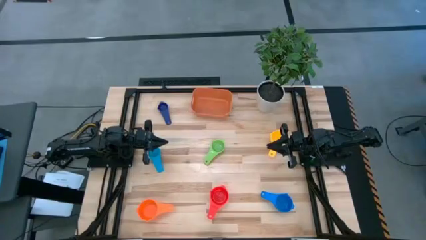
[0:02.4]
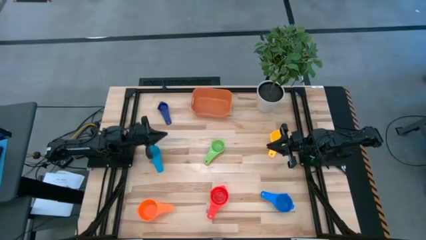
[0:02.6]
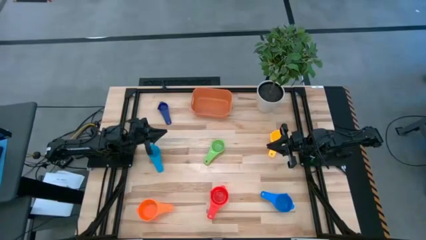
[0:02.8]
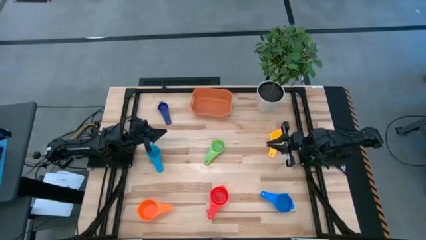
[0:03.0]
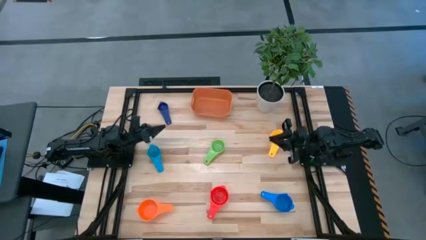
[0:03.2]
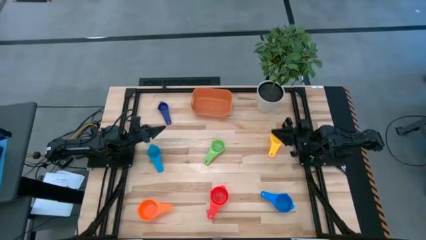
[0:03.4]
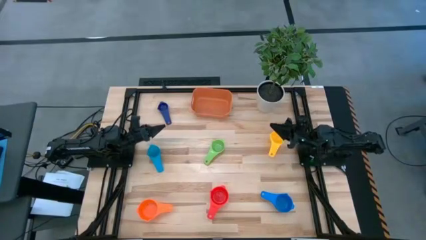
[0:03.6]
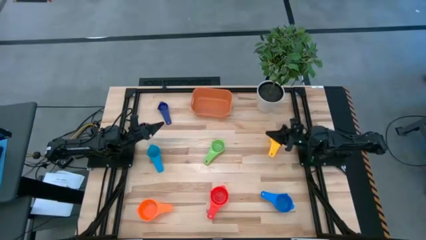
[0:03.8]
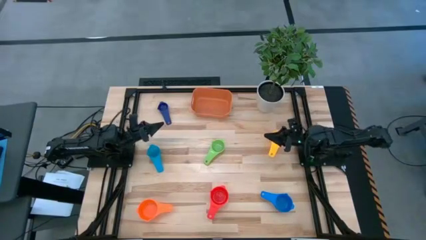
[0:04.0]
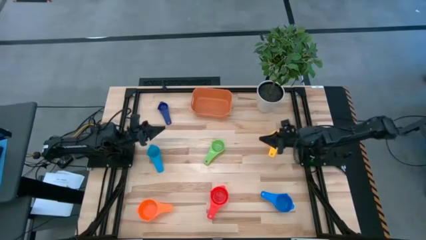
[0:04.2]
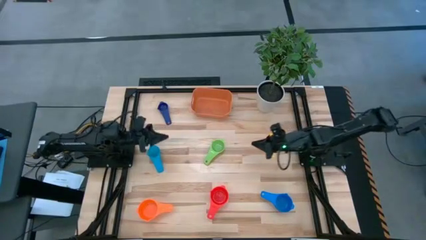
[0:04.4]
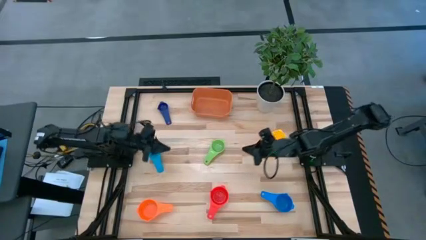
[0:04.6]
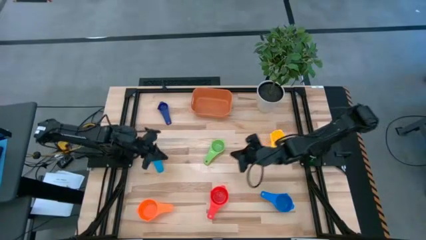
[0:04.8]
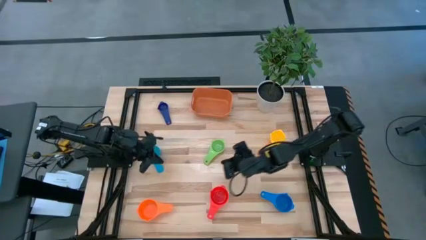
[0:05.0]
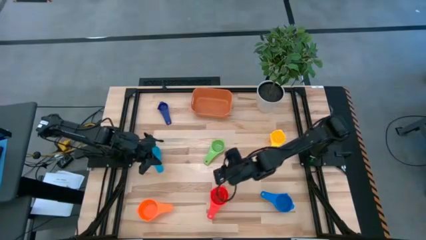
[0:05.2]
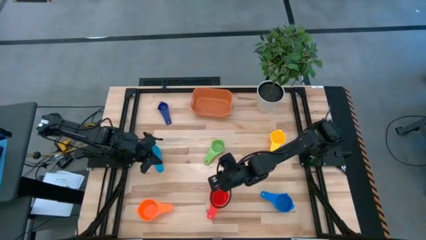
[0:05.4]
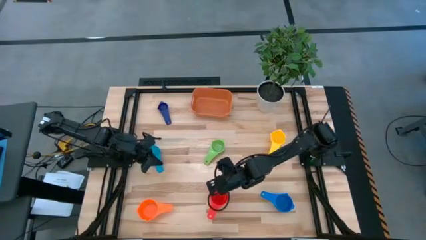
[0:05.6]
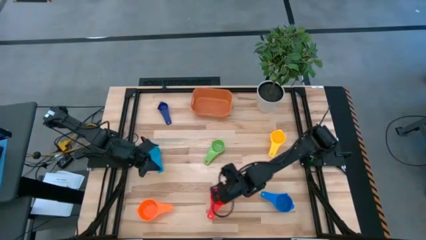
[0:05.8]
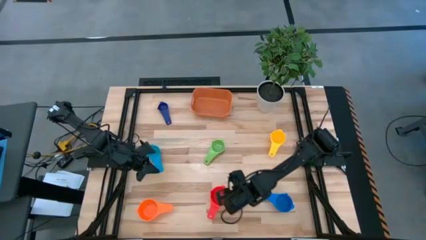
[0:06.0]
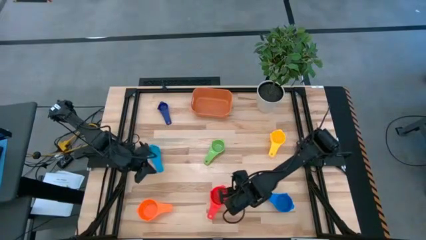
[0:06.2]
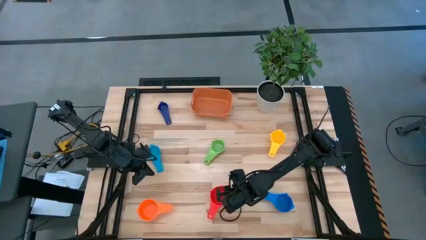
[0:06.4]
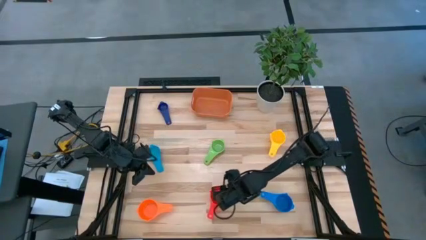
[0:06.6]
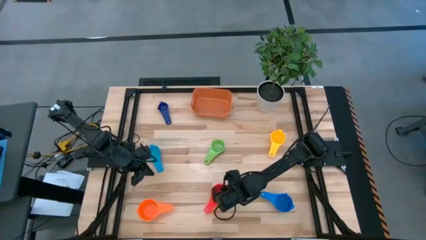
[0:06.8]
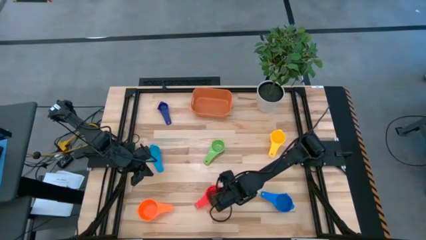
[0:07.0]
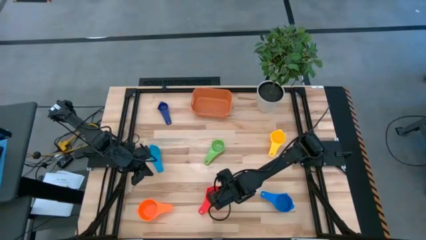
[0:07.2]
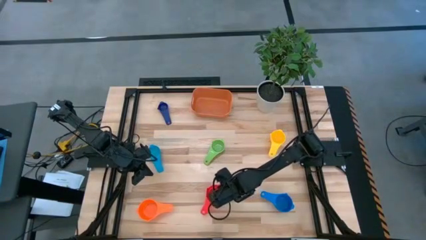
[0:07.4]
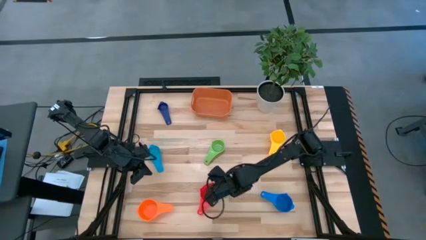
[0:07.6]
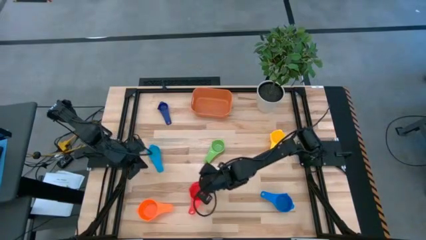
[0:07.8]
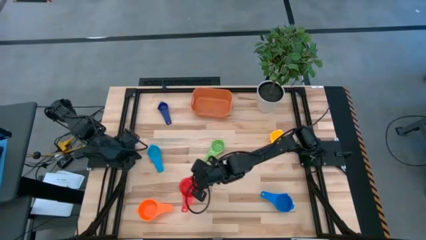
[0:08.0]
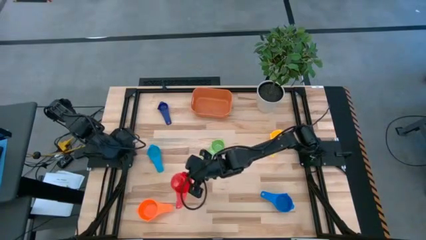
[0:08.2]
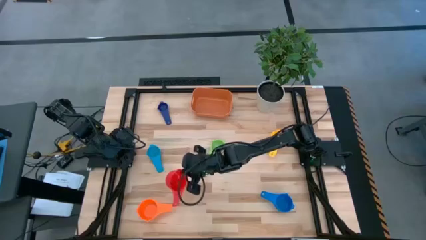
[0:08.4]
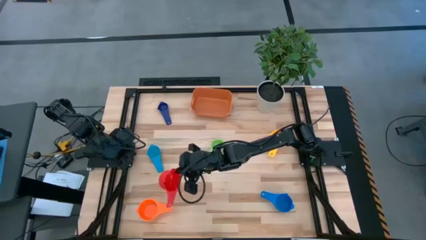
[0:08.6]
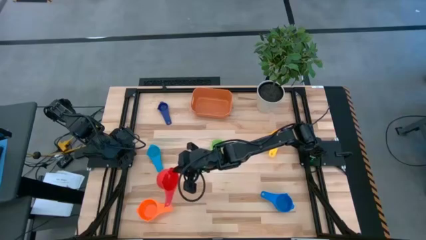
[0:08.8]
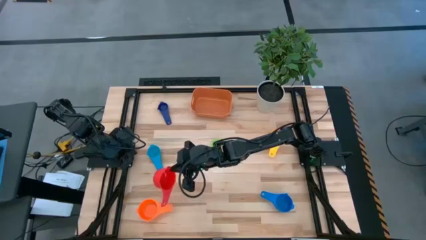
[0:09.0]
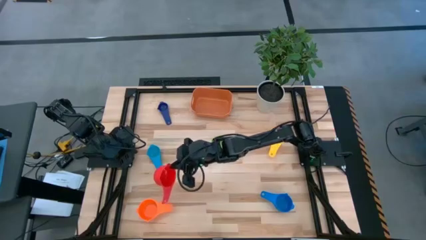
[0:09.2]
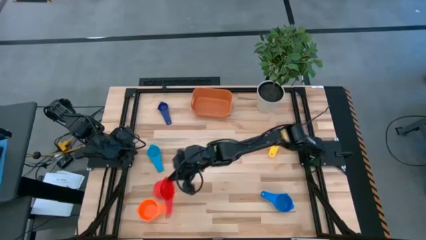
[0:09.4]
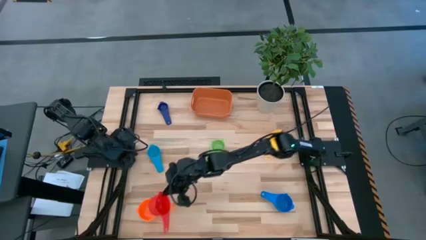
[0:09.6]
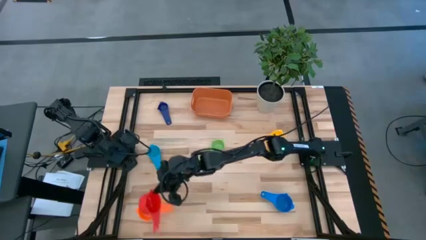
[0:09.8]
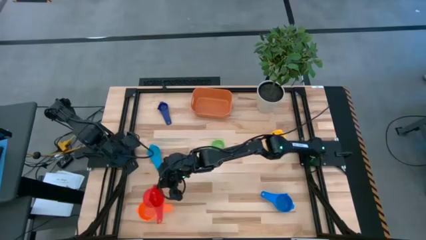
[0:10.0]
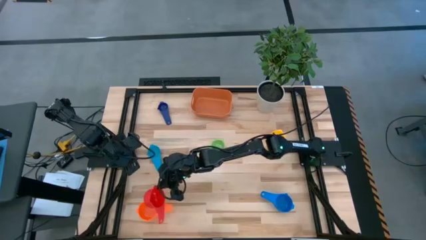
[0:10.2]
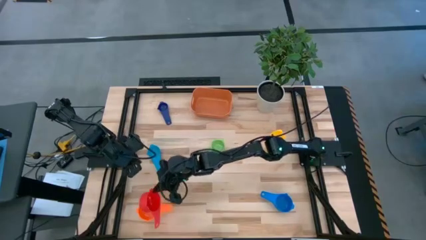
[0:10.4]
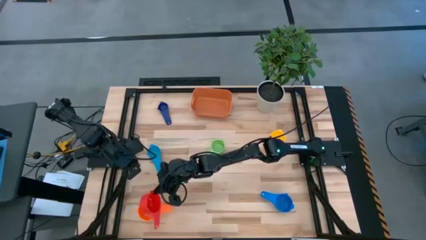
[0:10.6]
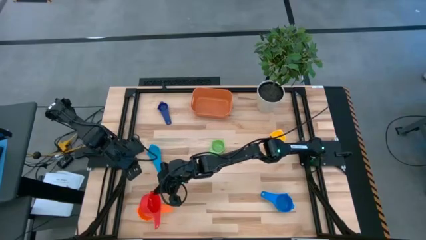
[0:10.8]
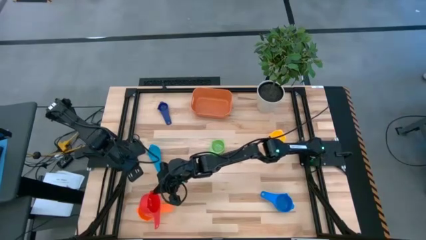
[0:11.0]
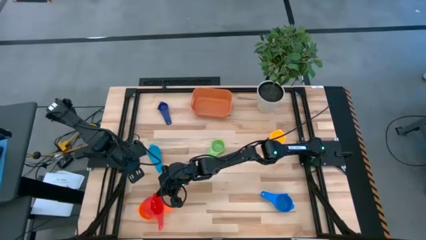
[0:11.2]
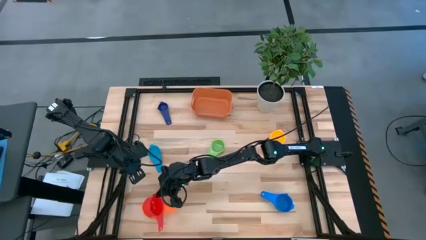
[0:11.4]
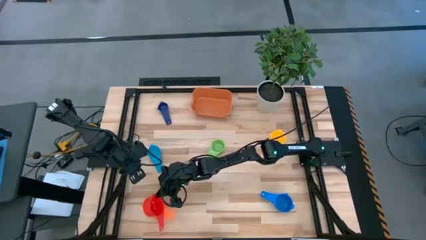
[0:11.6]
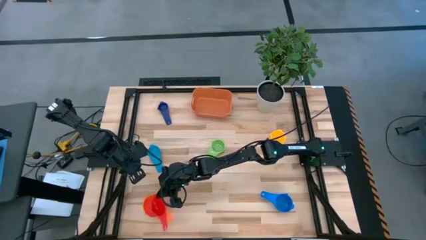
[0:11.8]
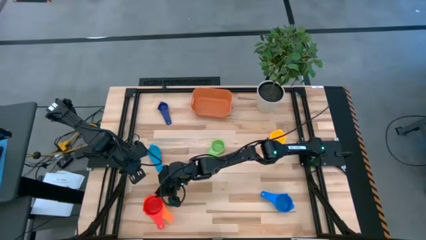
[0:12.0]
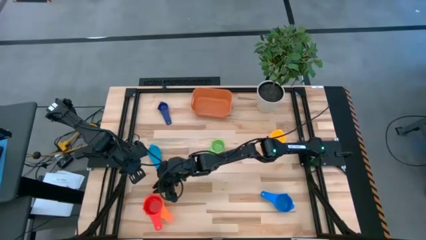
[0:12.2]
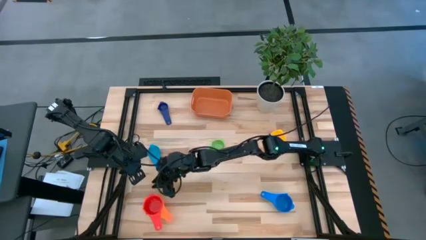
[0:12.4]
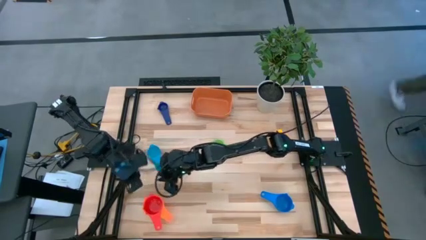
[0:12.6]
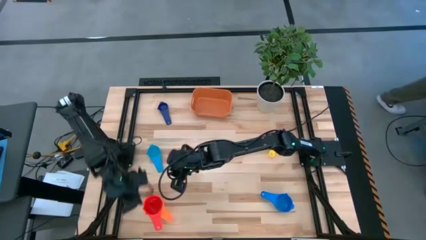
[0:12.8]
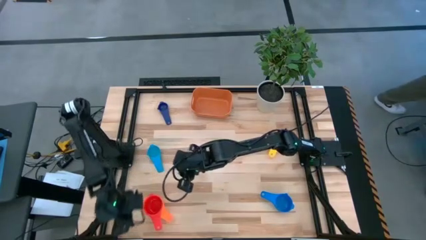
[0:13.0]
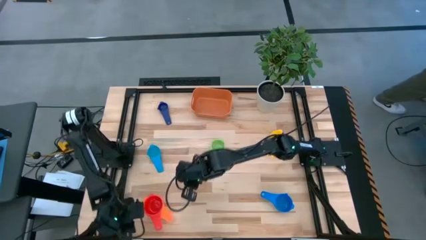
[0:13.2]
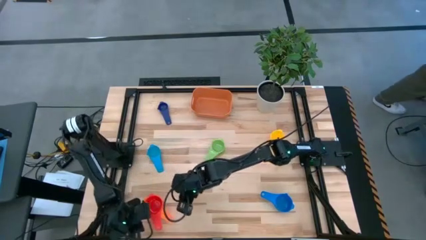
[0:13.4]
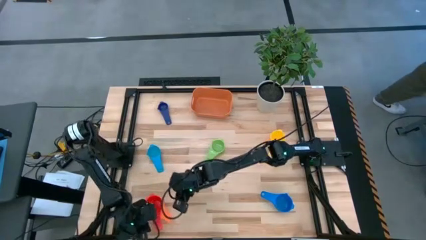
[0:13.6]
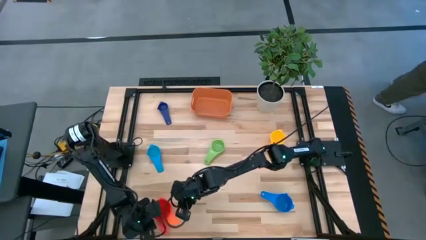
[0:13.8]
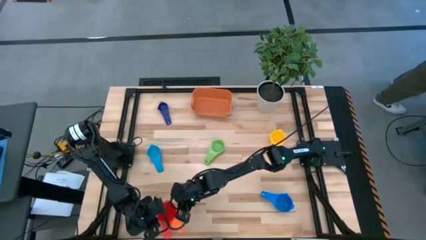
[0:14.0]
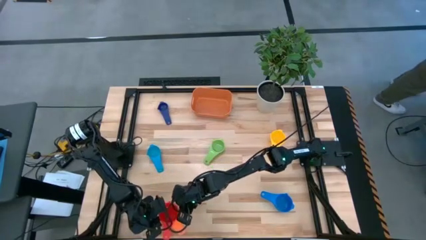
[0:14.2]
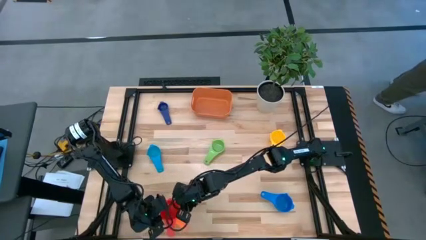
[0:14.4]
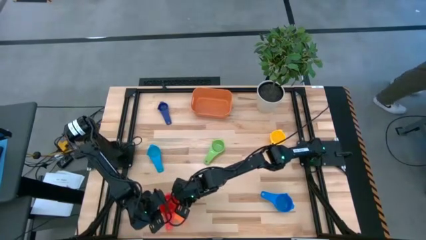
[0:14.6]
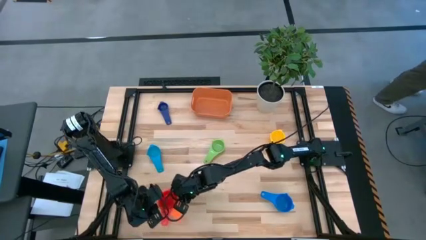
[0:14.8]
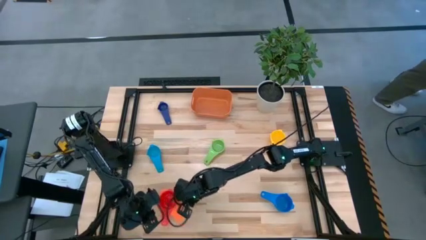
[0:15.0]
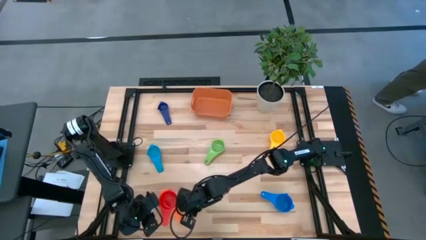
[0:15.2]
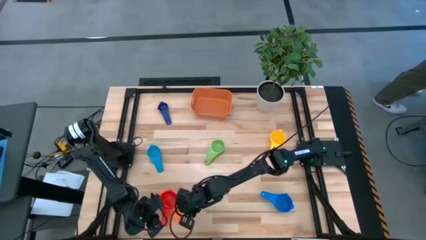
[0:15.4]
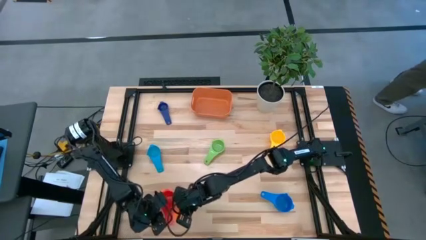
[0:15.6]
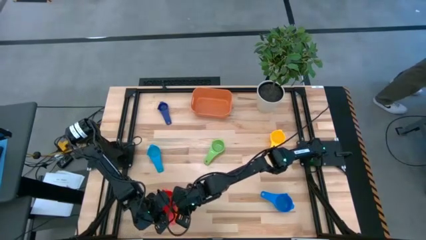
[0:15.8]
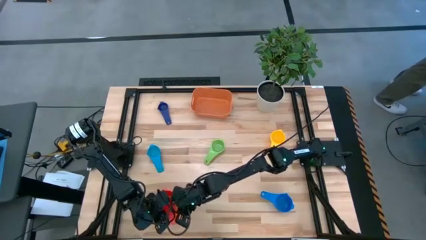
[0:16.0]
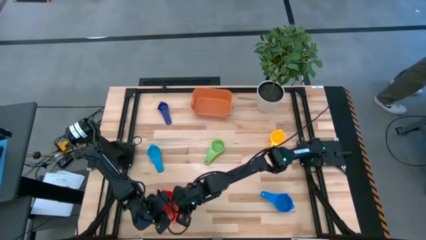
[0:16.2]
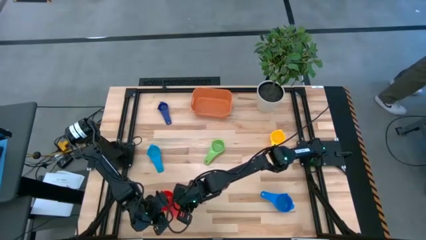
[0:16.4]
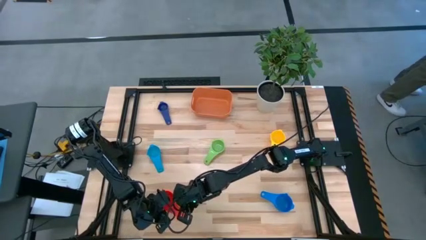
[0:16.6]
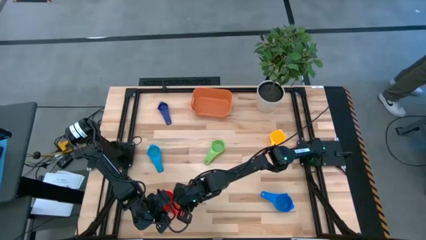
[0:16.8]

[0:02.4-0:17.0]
Task: Nest measuring cups in basket
Stack the red measuring cup on top of the orange measuring cup

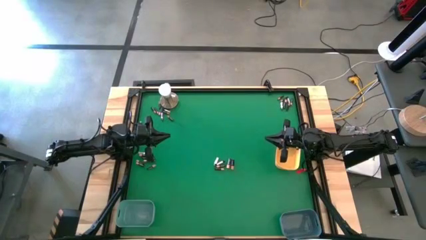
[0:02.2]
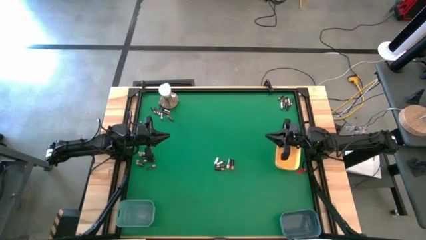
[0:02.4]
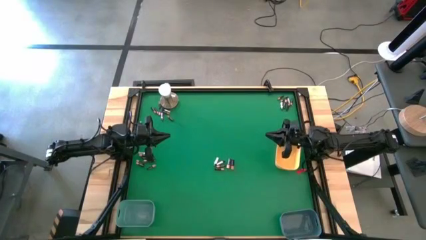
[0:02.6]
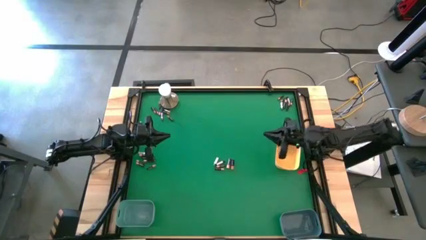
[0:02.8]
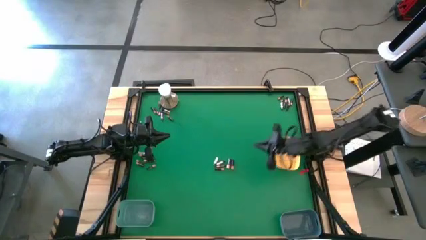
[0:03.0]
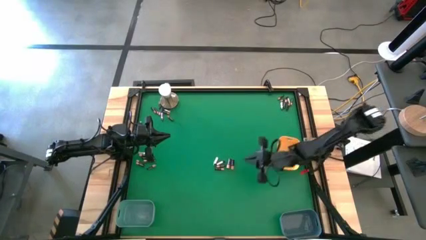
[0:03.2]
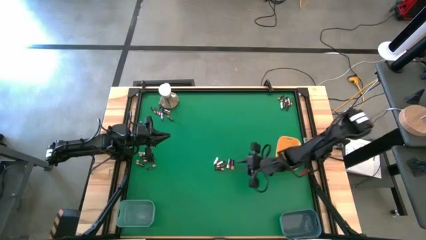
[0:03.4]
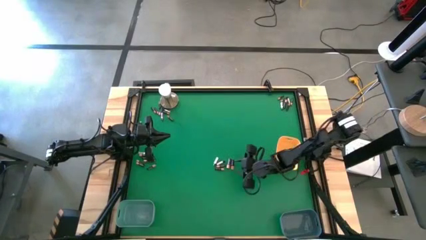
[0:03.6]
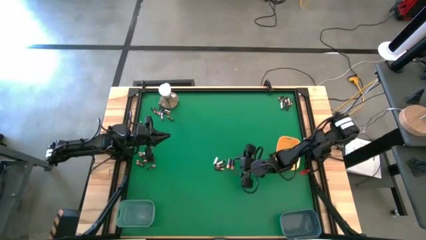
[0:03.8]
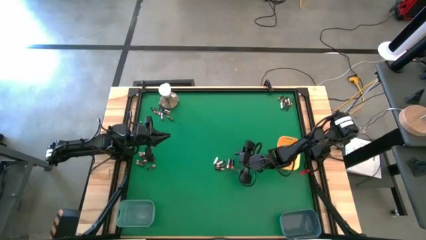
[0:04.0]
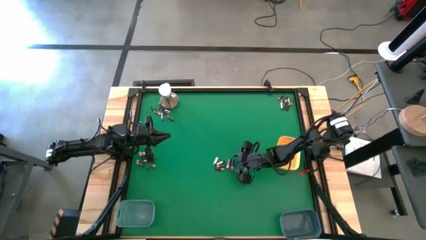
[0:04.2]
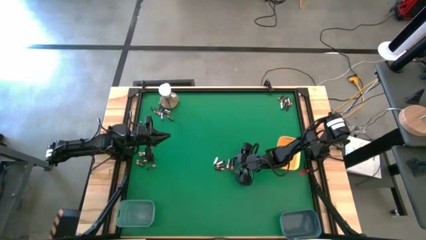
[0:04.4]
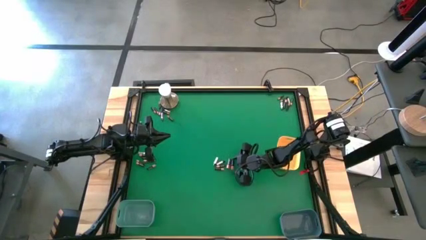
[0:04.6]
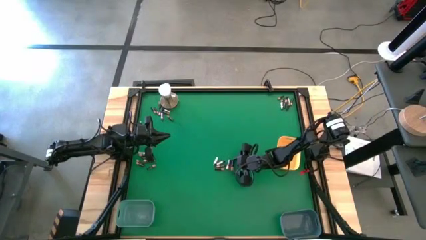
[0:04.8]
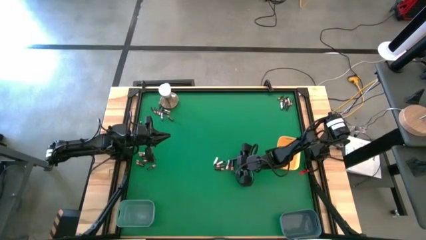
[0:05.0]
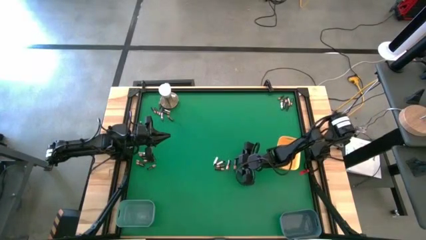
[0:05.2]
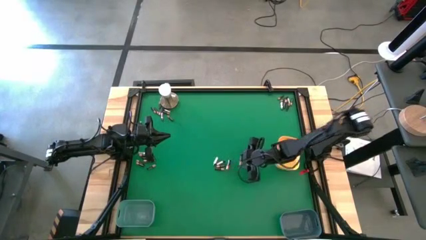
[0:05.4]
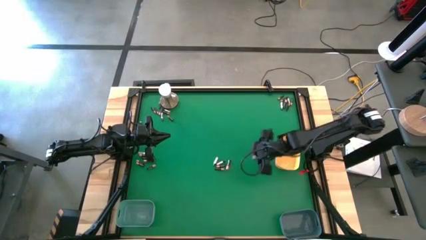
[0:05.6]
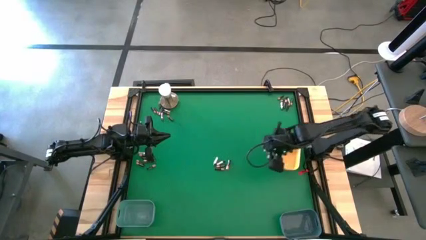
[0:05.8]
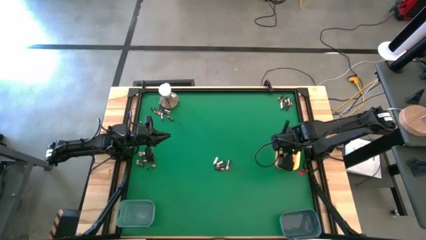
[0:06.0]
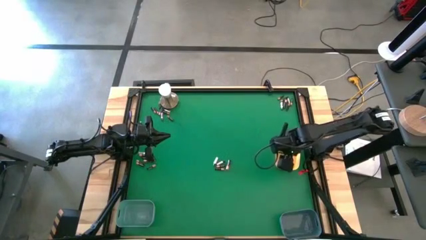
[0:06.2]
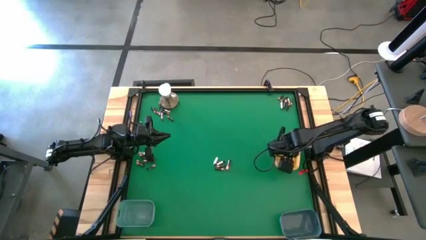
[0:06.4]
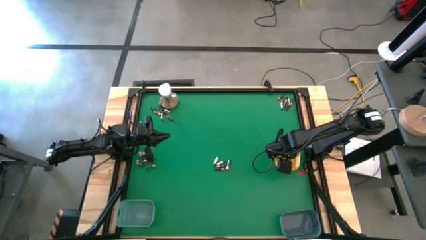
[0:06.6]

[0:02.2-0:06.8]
Task: Sort batteries
Put the large black battery into the yellow bin
